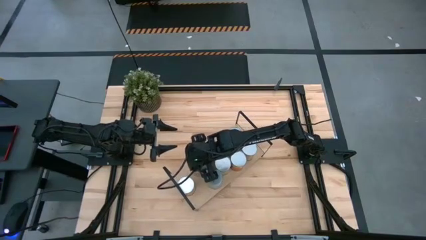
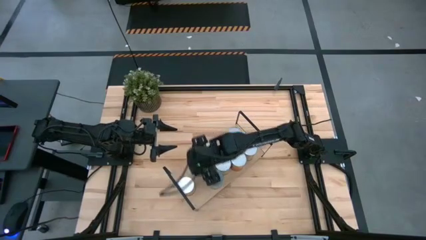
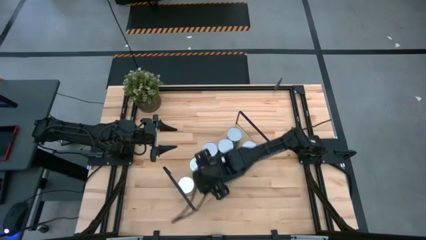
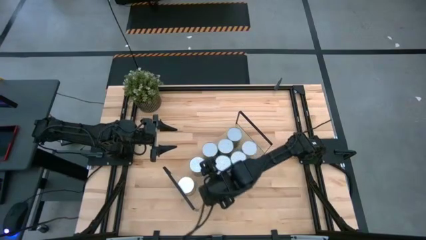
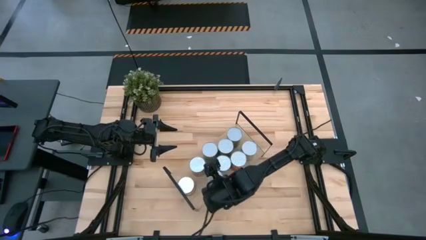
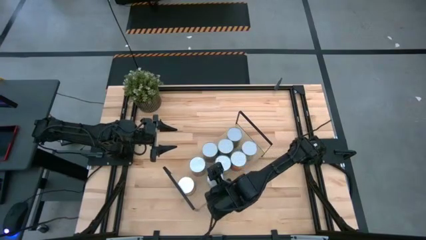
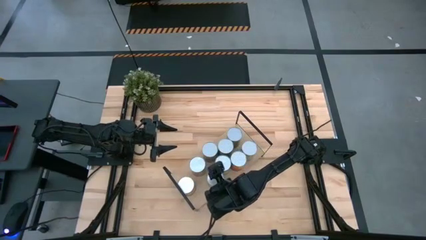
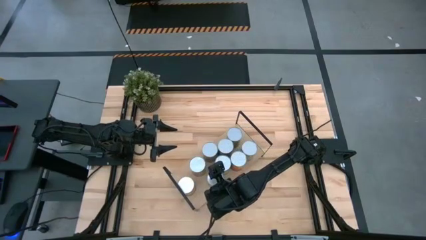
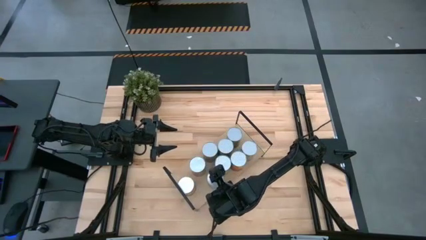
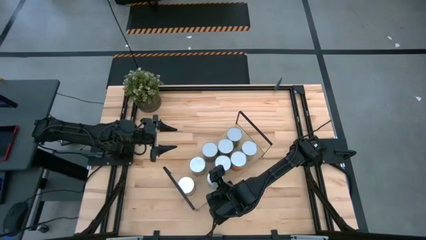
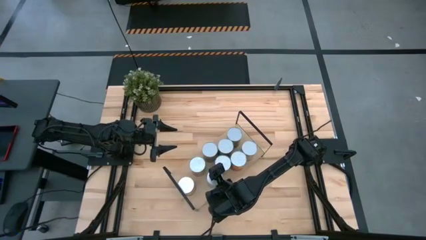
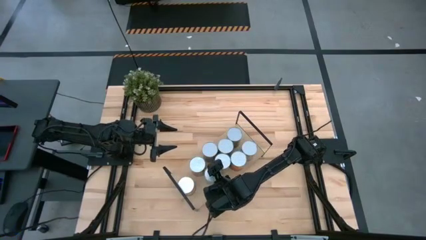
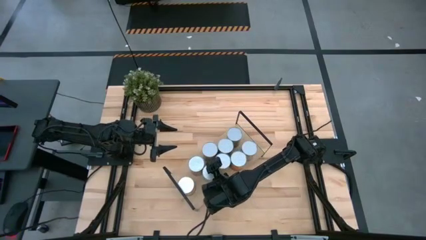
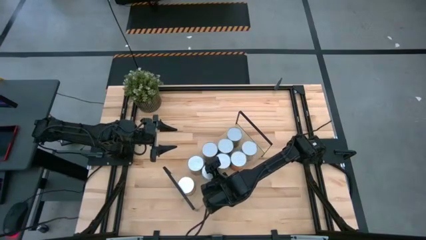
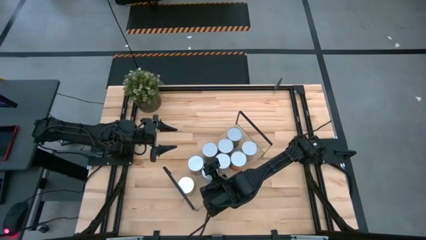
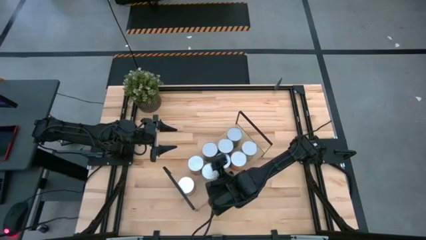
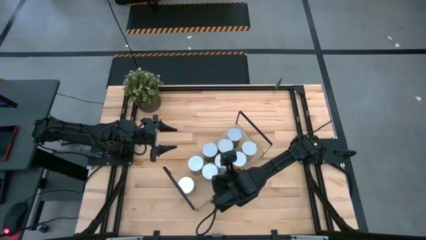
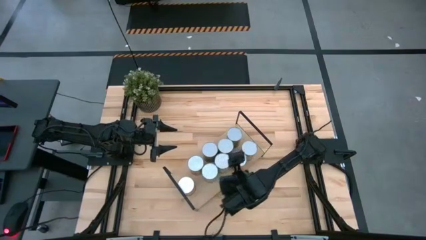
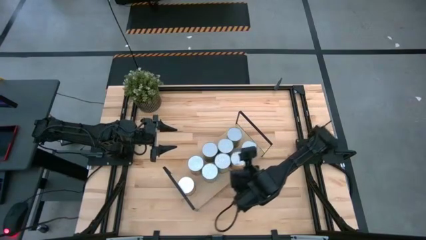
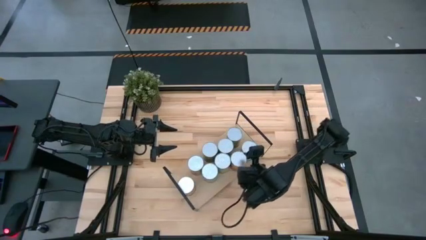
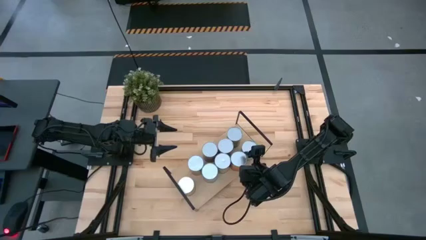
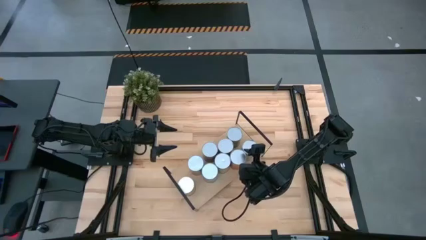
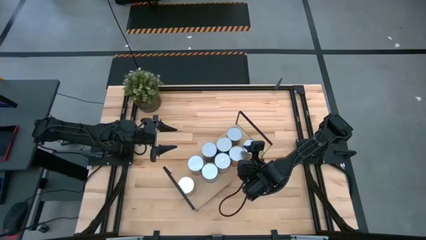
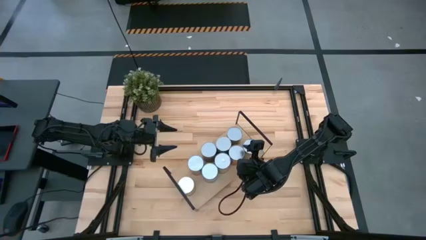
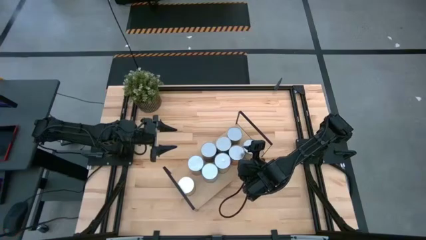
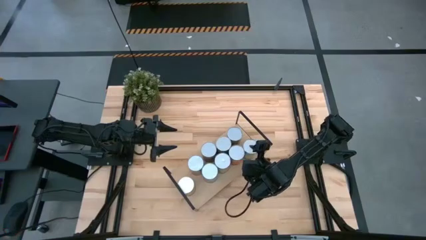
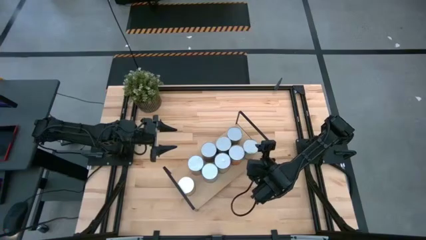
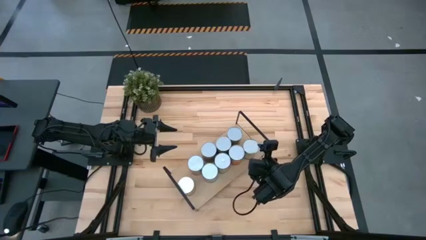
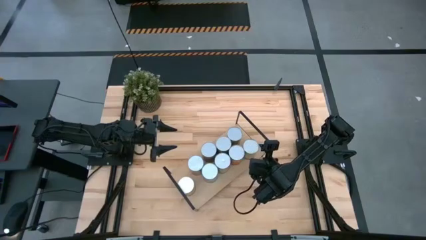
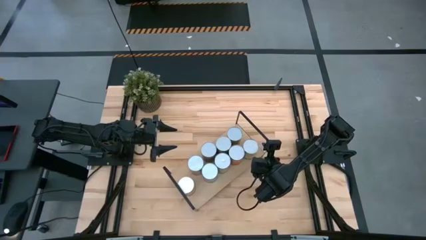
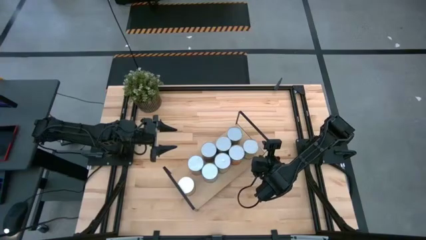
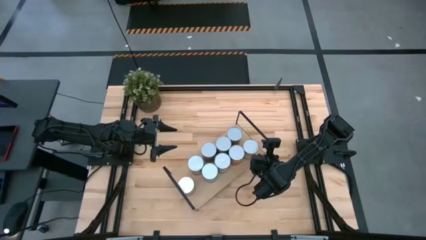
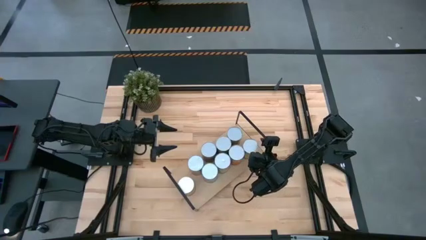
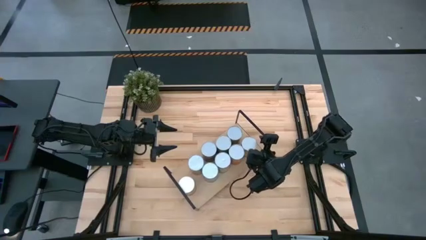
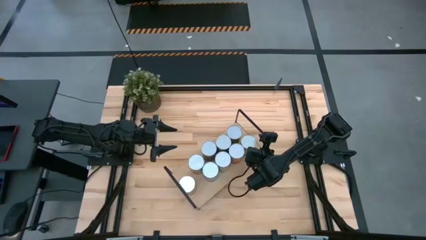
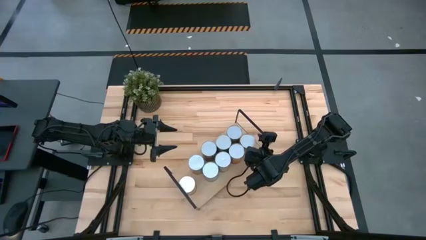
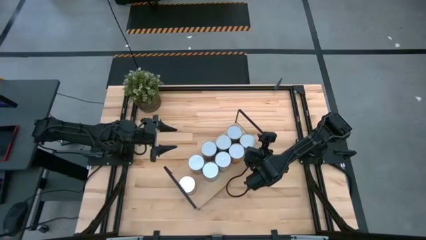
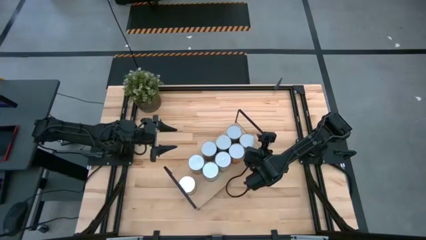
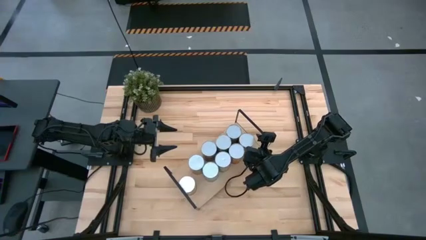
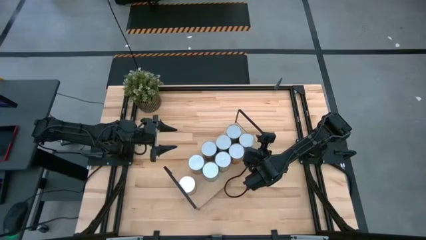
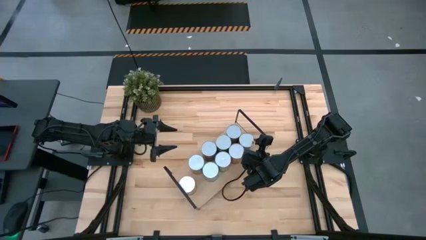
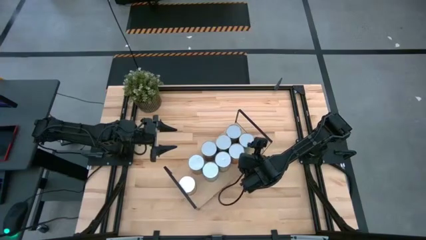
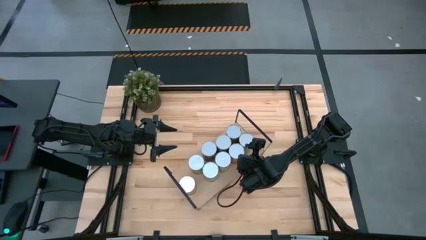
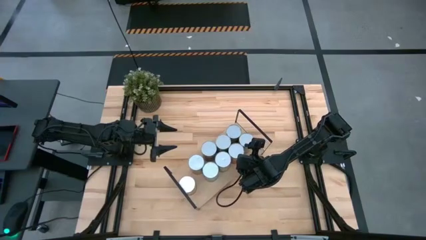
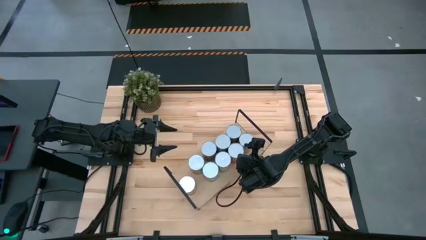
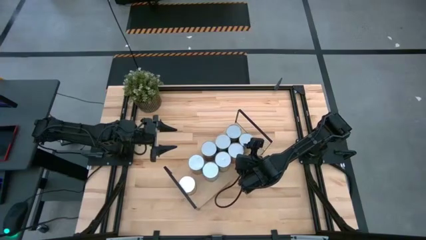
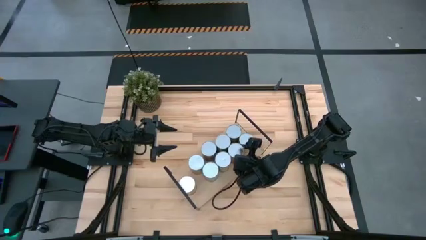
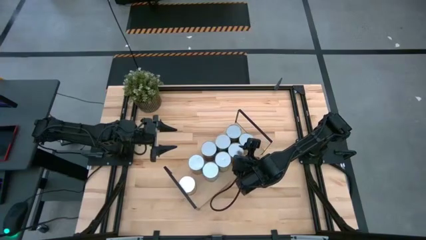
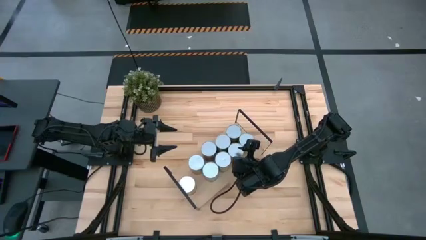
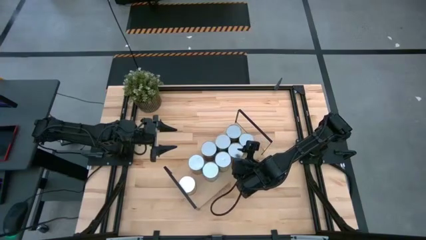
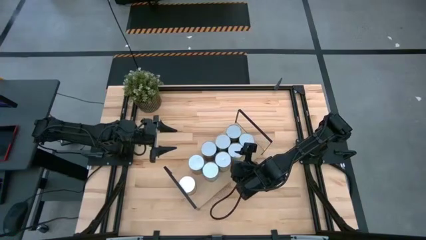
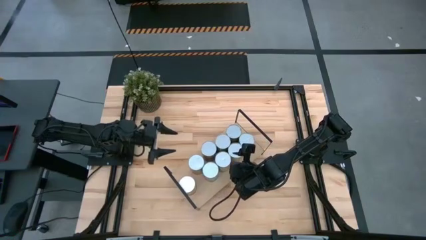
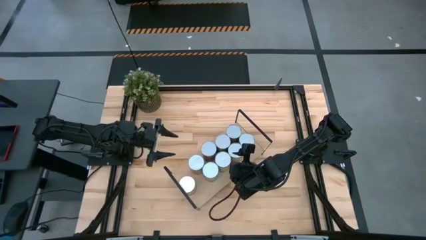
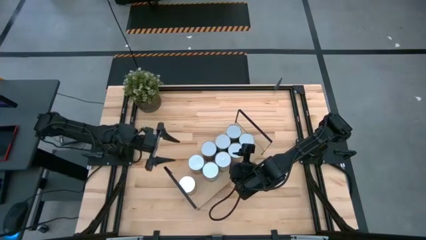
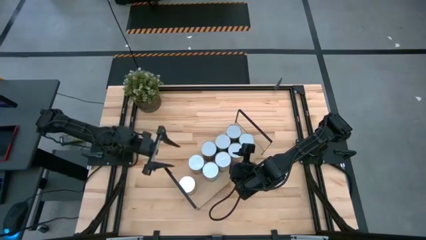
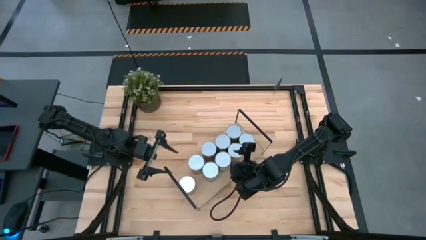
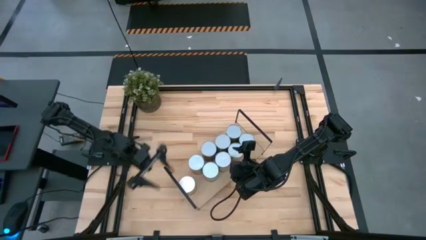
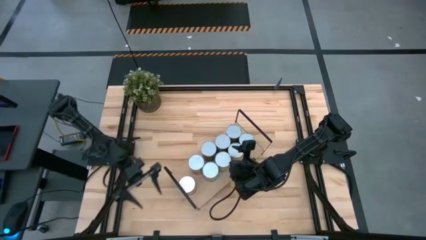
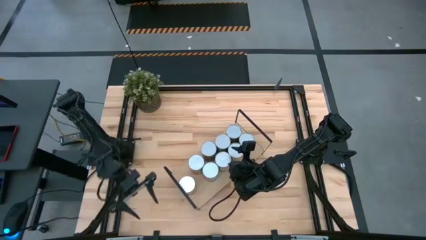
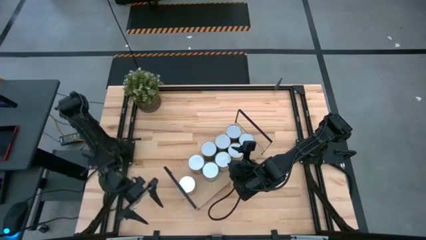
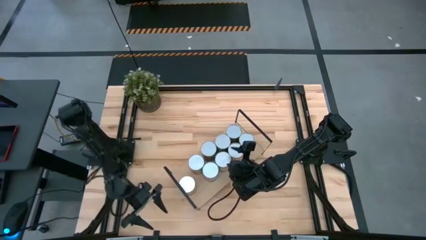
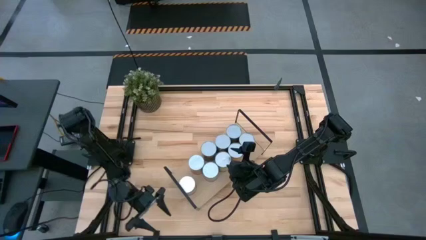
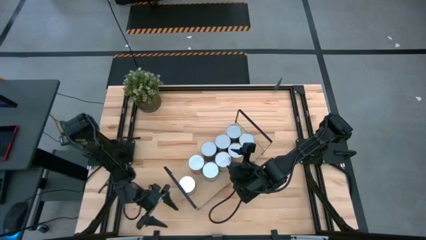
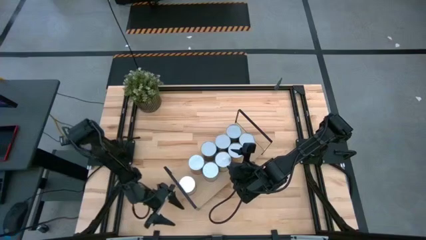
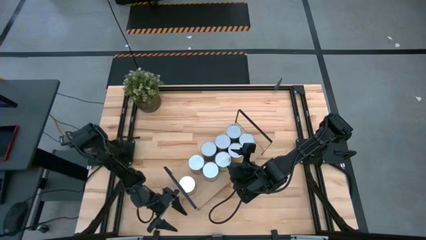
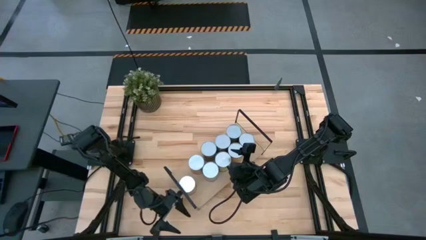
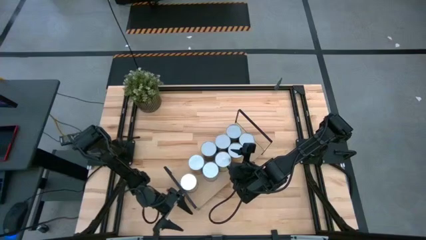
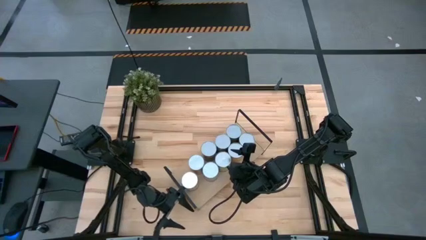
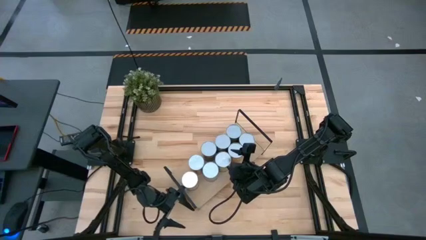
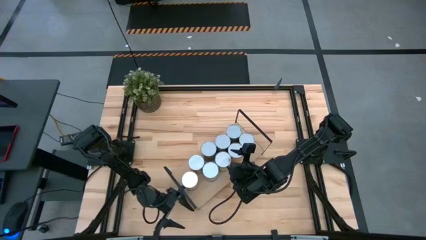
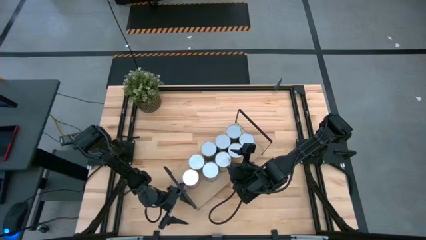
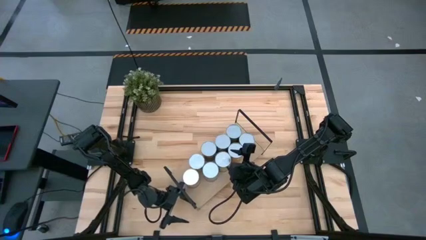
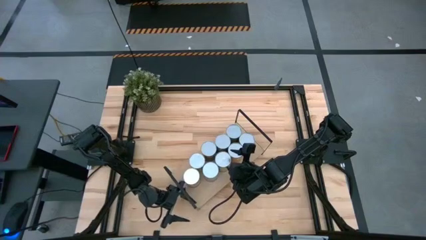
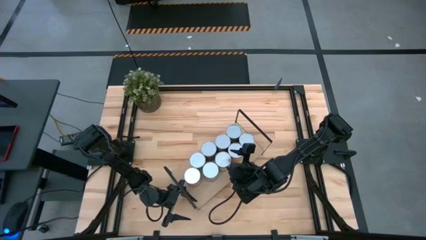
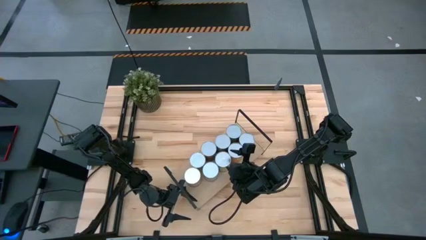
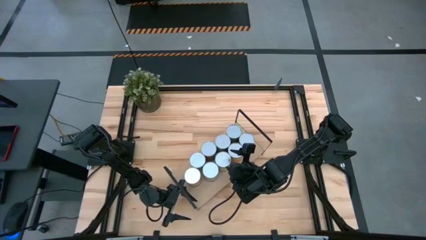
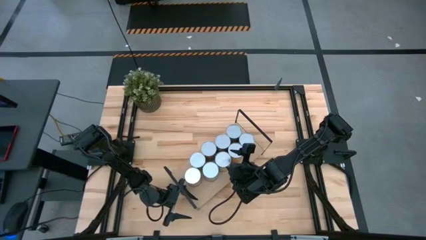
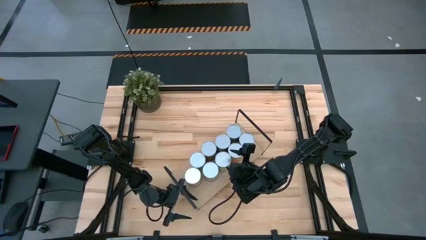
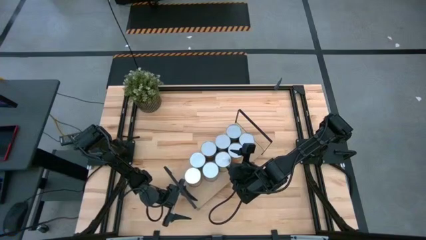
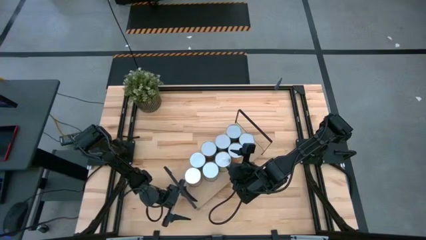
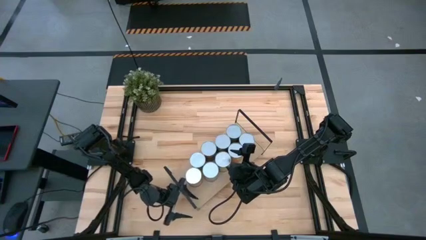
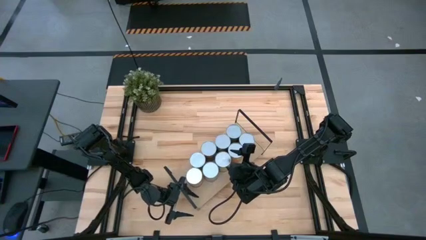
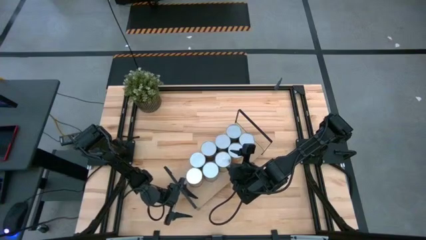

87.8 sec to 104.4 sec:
Task: Pick and place cans onto a shelf
Adjust the cans on the shelf
